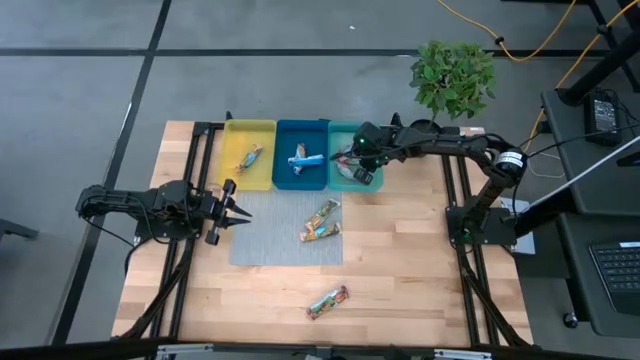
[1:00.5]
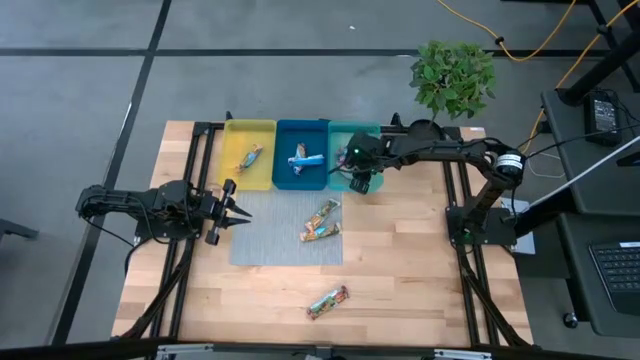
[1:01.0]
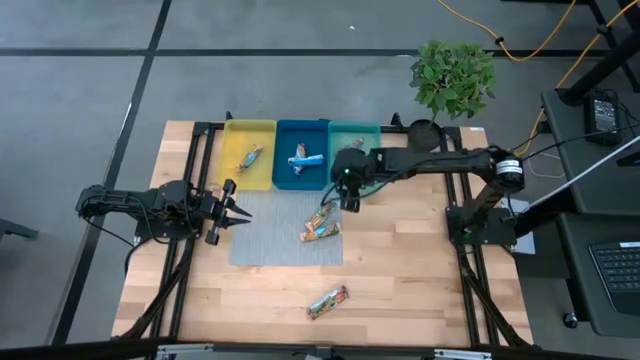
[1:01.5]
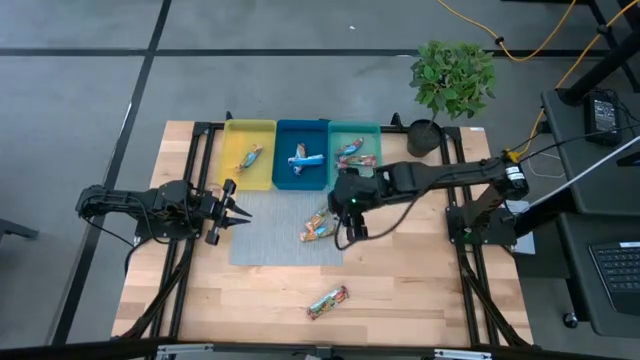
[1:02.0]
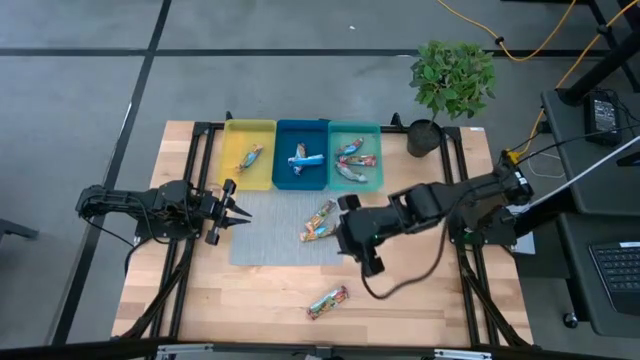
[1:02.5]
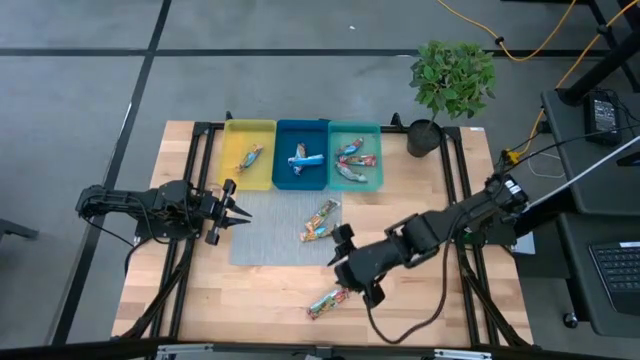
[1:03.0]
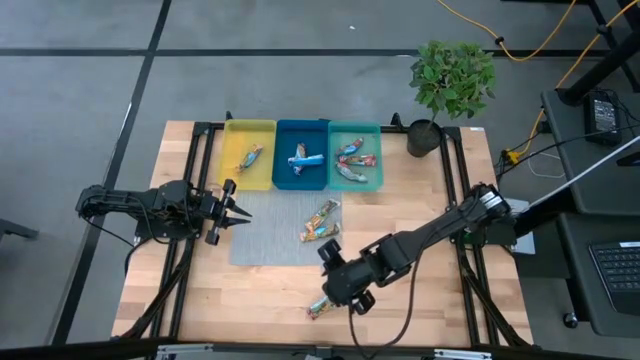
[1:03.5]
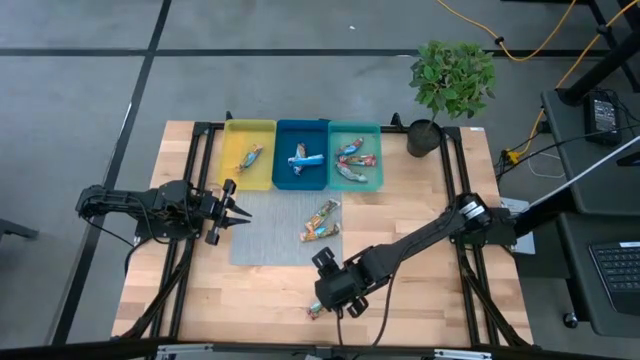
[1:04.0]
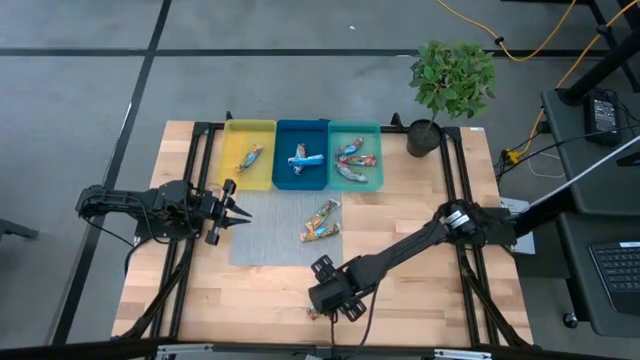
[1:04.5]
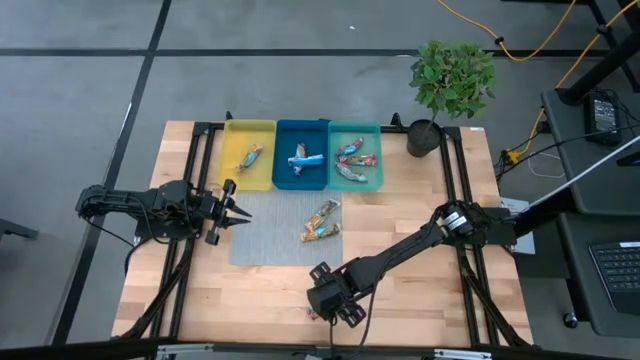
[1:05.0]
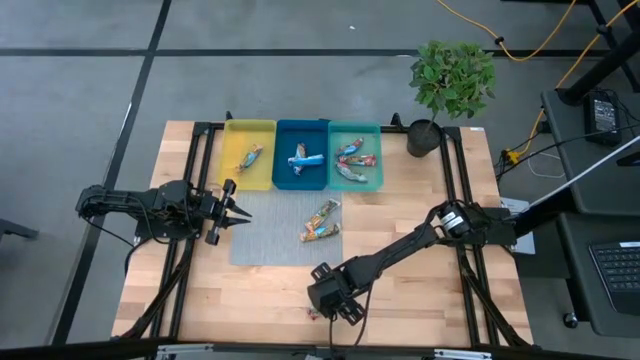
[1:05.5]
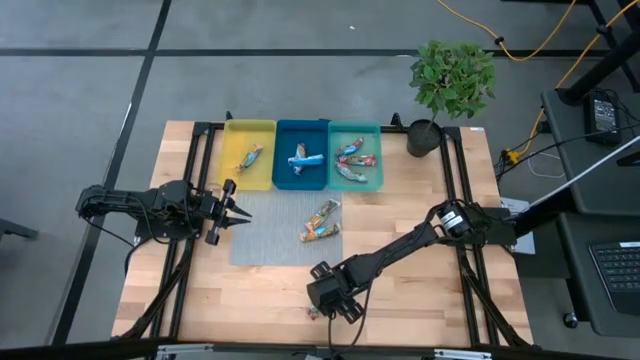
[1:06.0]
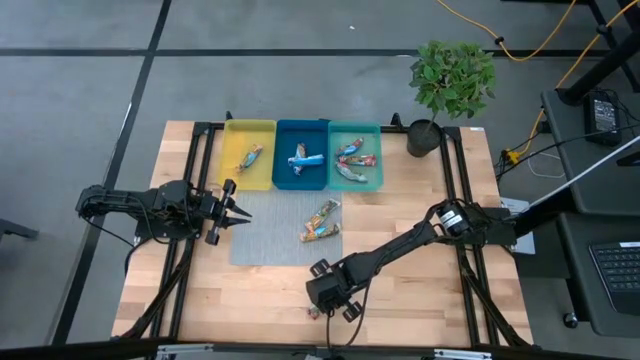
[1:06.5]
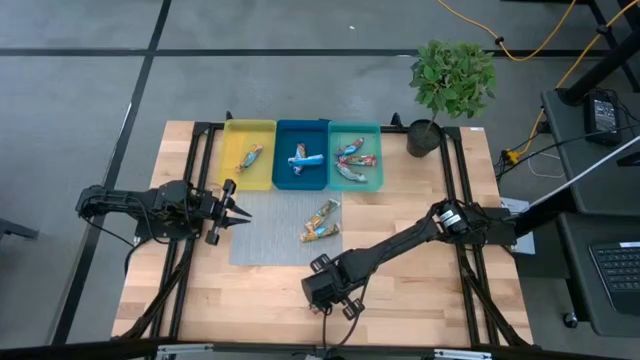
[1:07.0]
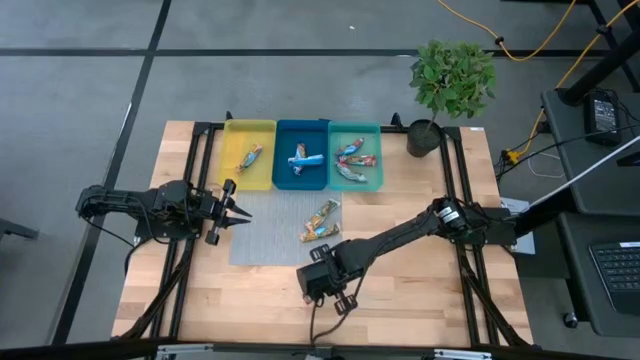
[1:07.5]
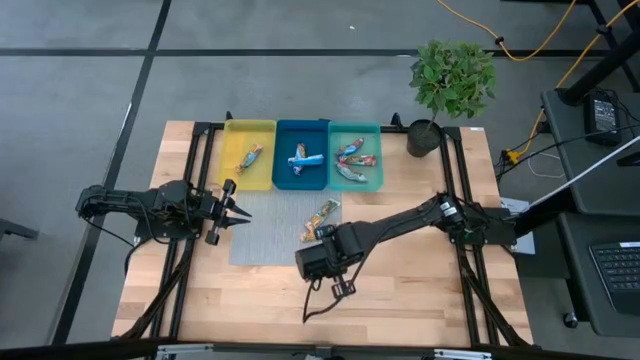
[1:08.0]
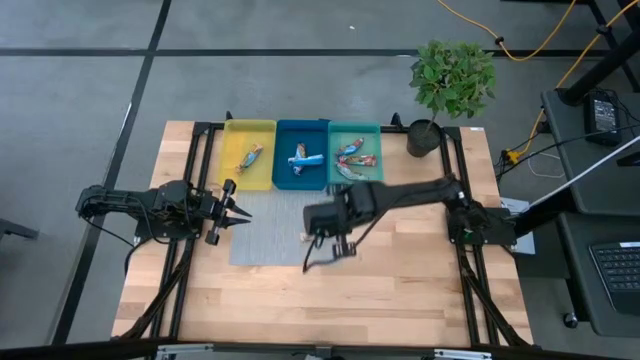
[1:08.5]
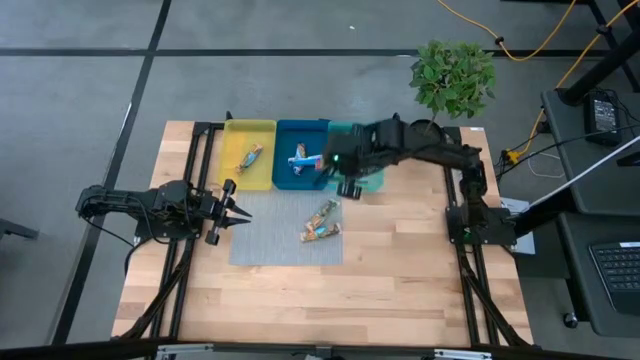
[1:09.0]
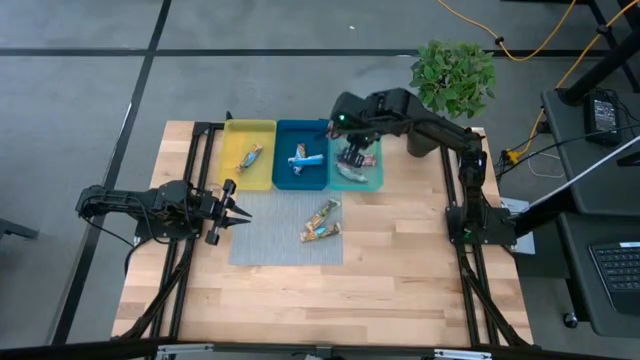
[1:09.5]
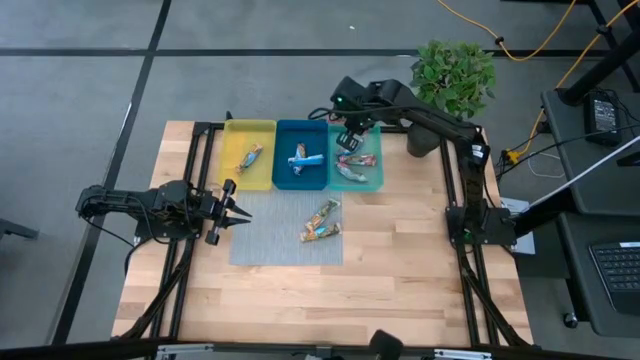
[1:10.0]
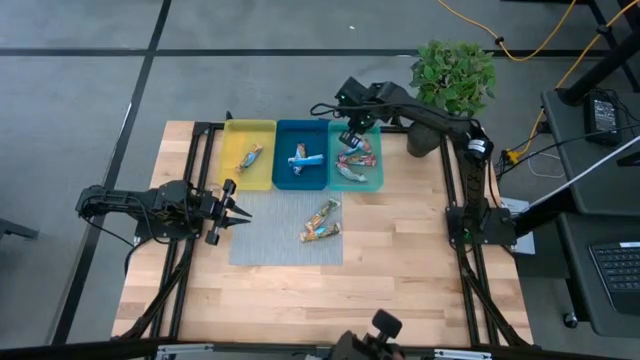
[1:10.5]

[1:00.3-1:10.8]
Task: Pick and place Granola Bars by type
Put the red granola bar into the light blue bin

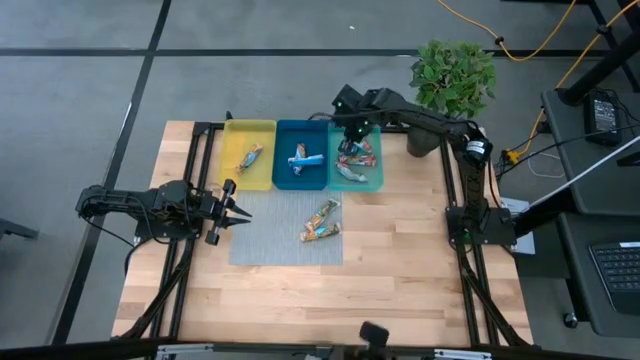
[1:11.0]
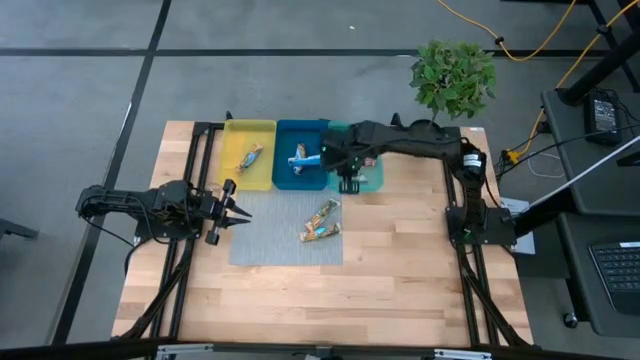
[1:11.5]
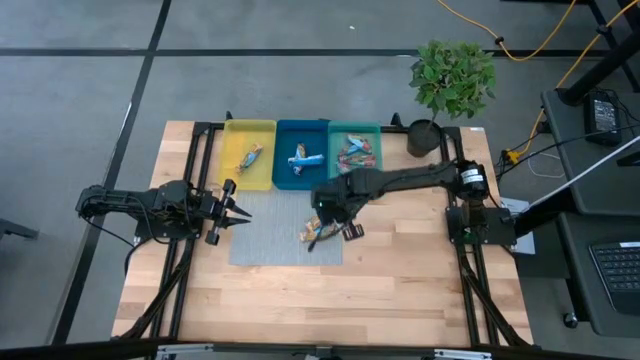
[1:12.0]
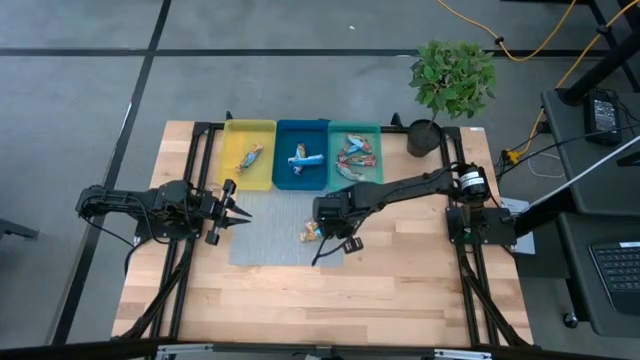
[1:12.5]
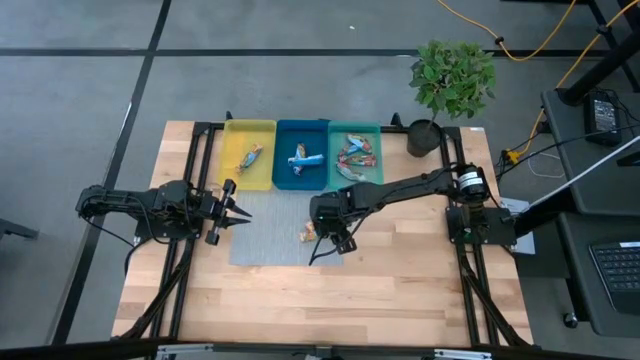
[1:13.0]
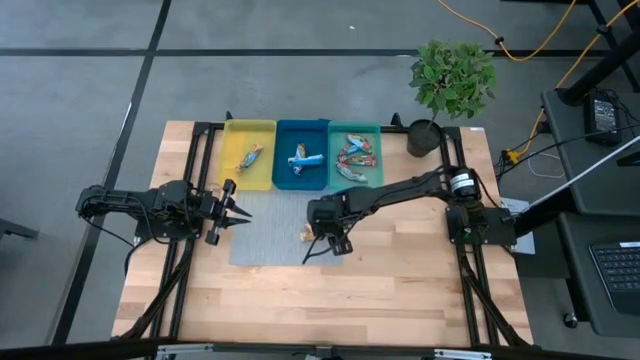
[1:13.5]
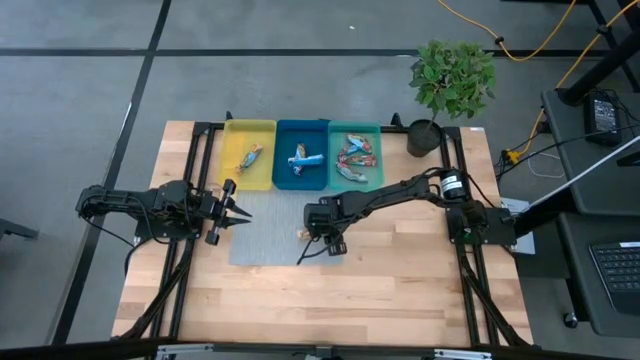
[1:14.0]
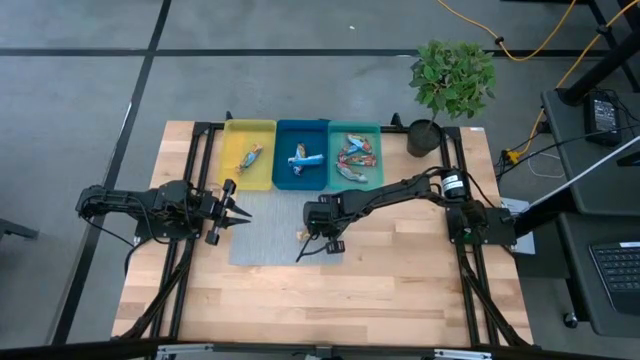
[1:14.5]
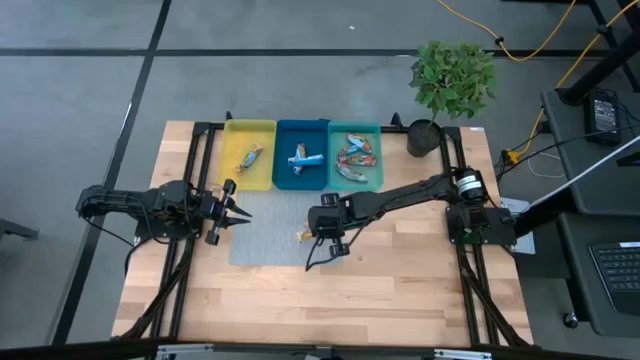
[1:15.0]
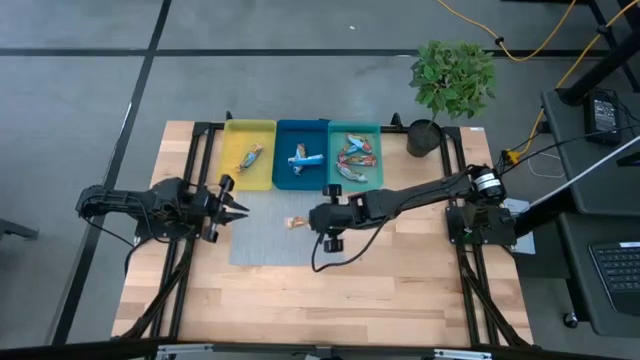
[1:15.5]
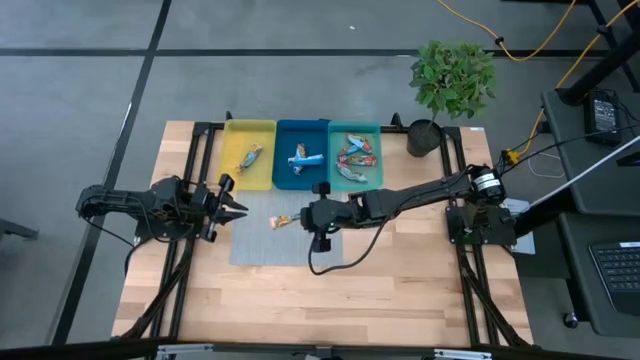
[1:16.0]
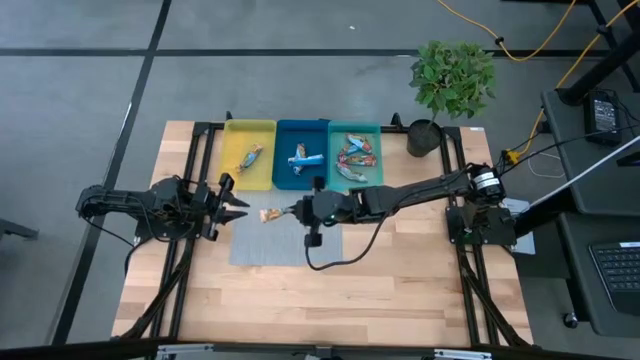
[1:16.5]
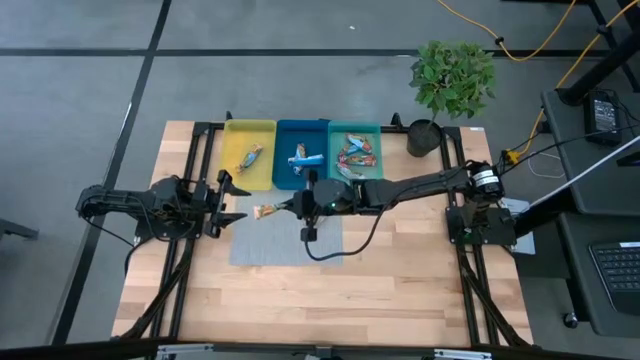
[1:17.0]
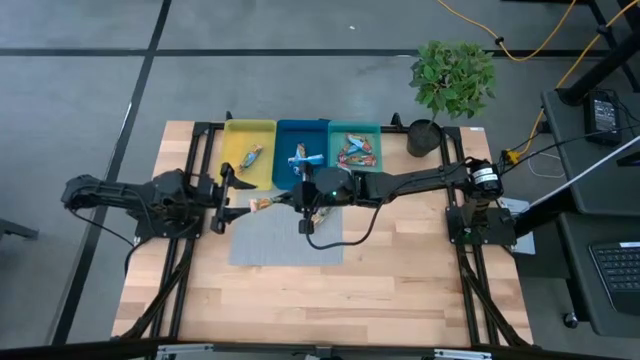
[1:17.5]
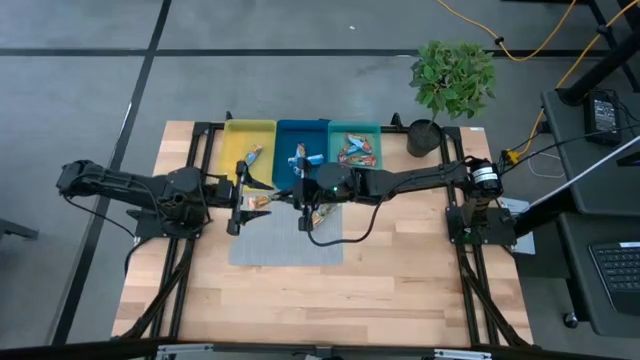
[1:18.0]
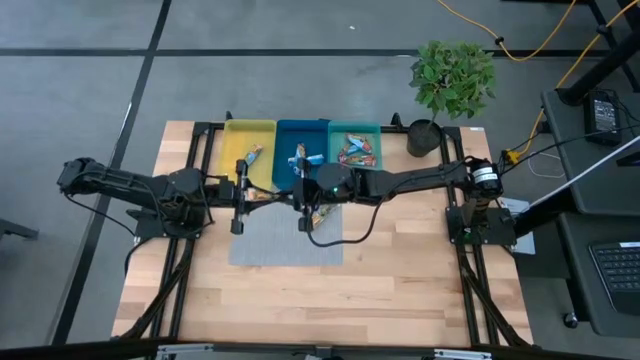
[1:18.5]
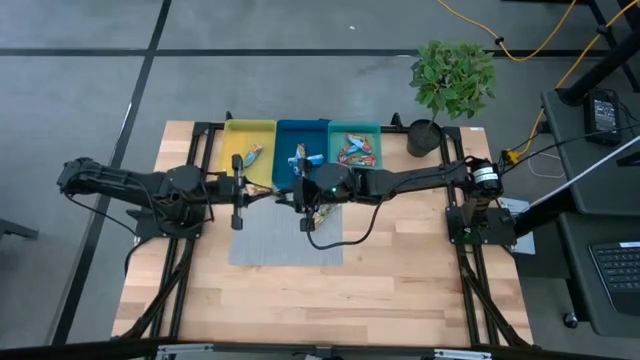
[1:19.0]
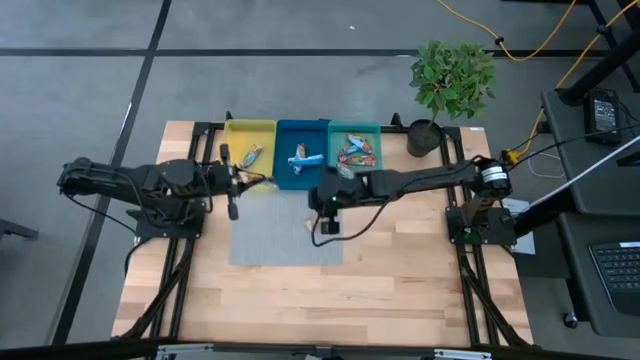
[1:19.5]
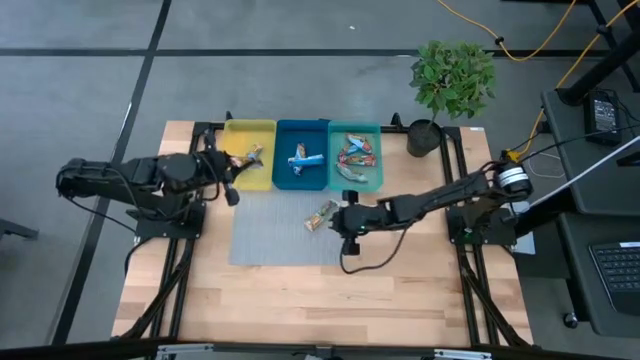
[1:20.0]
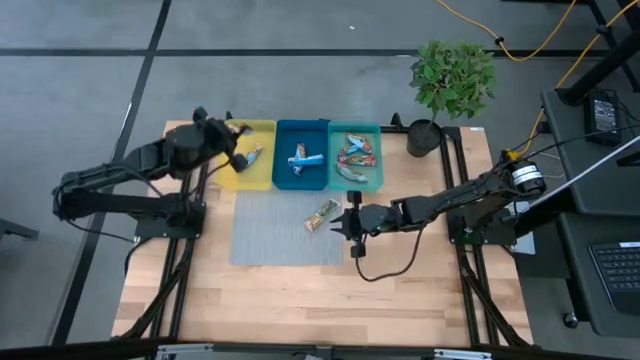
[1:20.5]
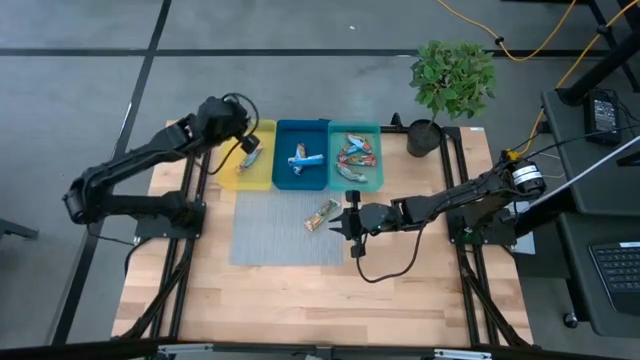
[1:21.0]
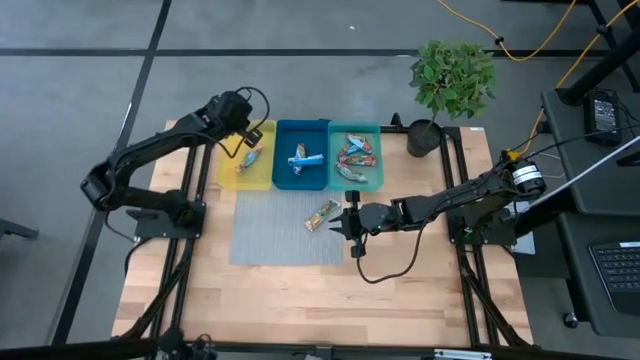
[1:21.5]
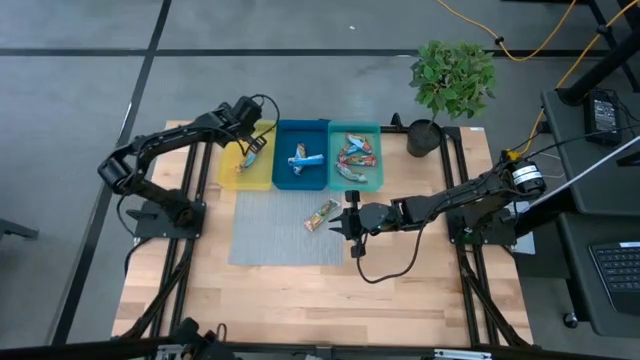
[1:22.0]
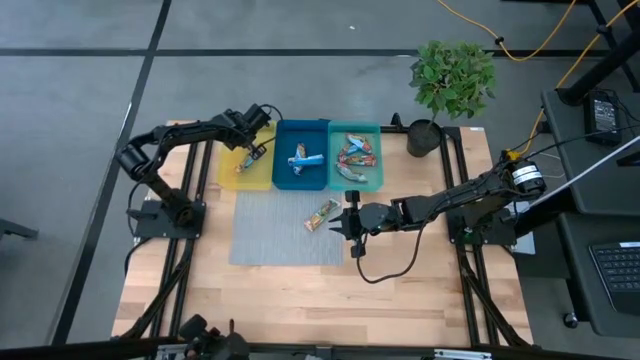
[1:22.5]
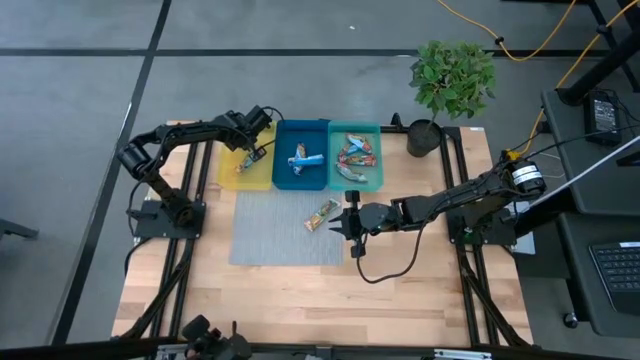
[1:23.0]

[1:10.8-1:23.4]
Put the bottom orange granola bar into the yellow bin
